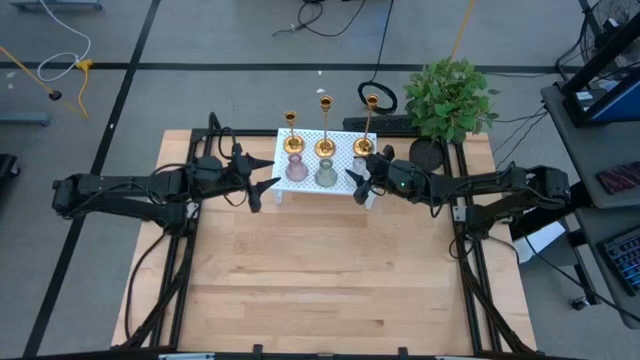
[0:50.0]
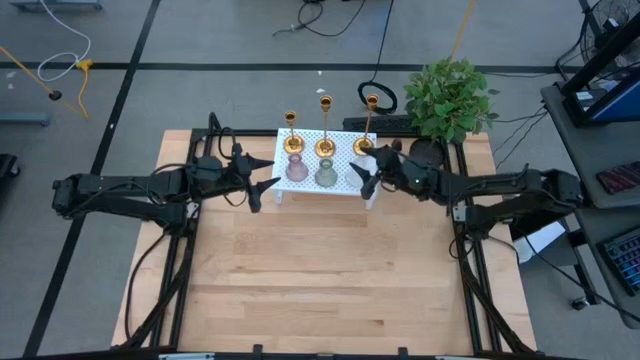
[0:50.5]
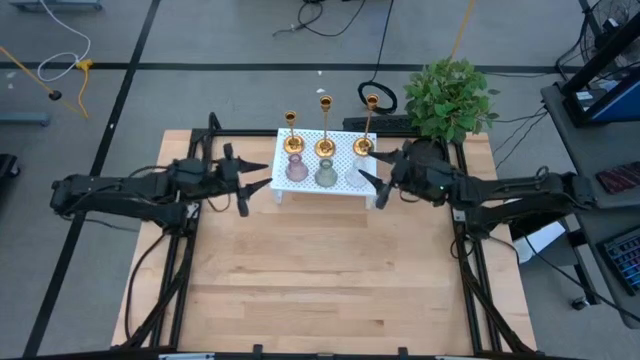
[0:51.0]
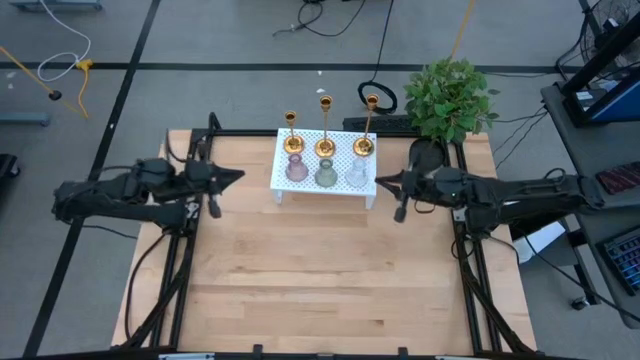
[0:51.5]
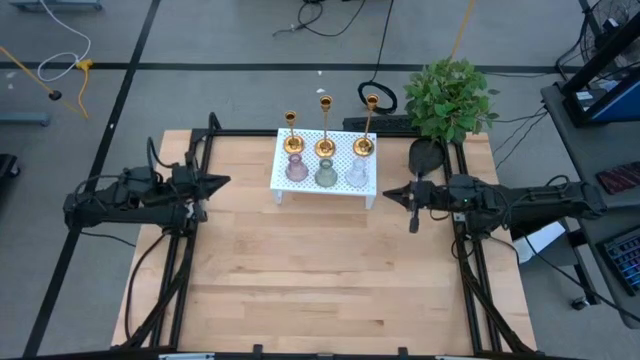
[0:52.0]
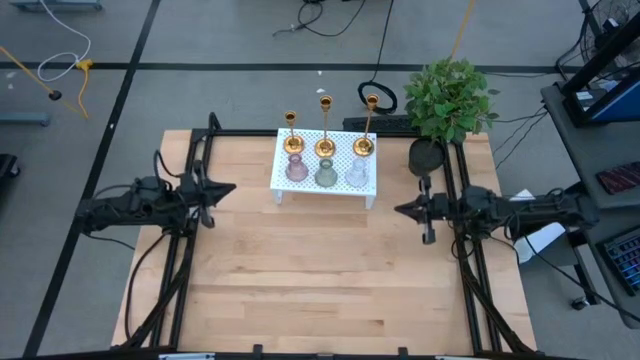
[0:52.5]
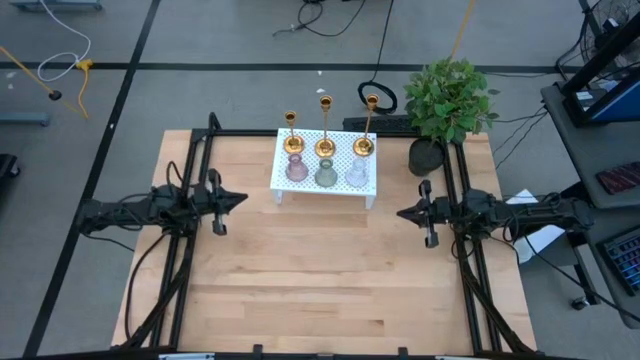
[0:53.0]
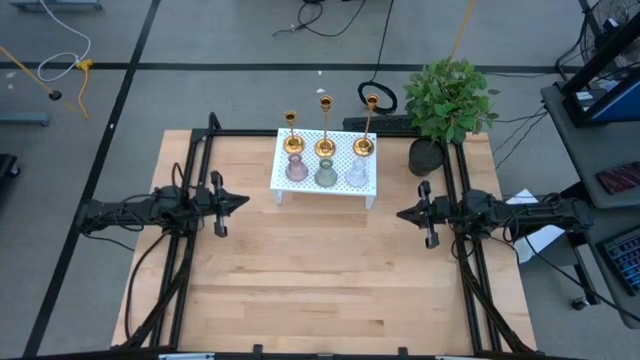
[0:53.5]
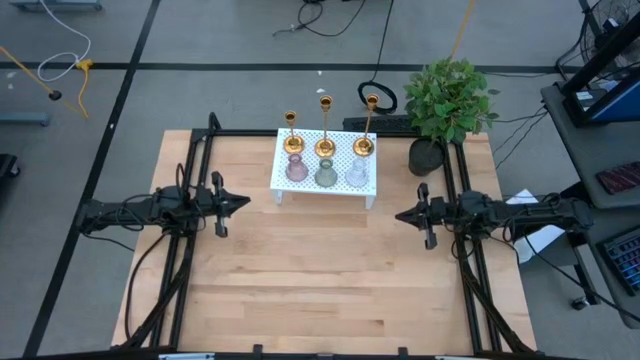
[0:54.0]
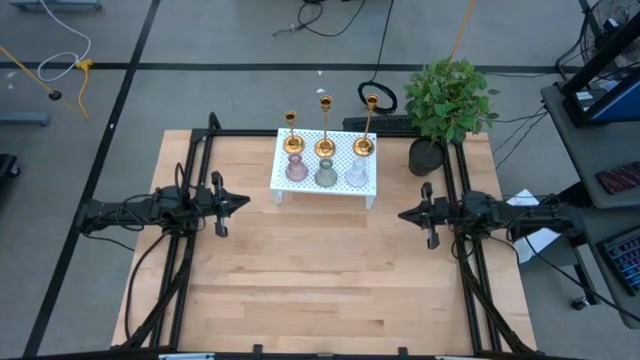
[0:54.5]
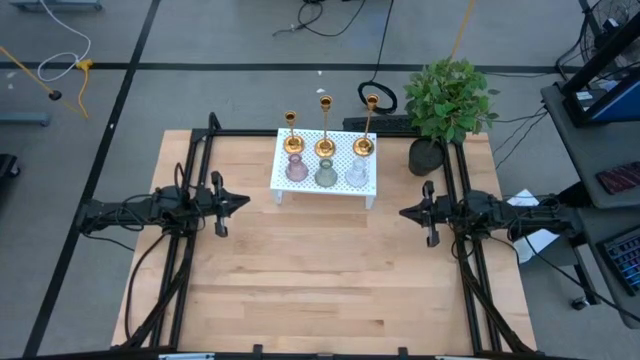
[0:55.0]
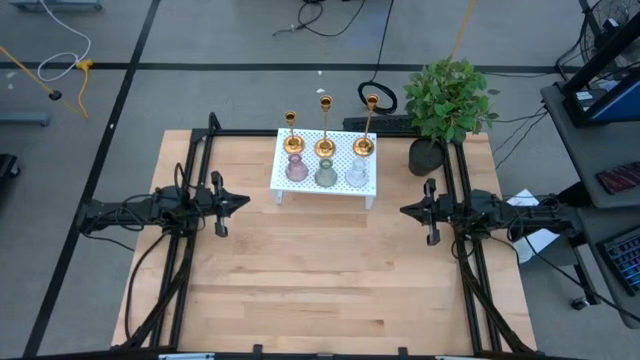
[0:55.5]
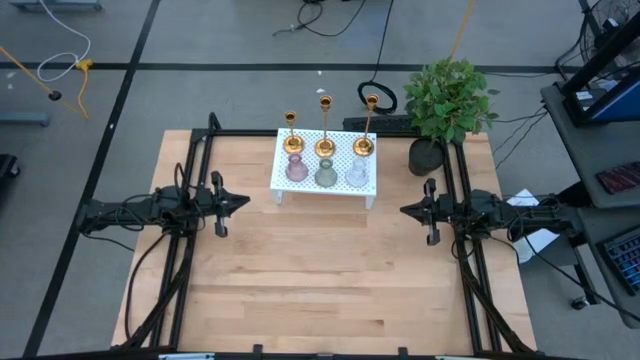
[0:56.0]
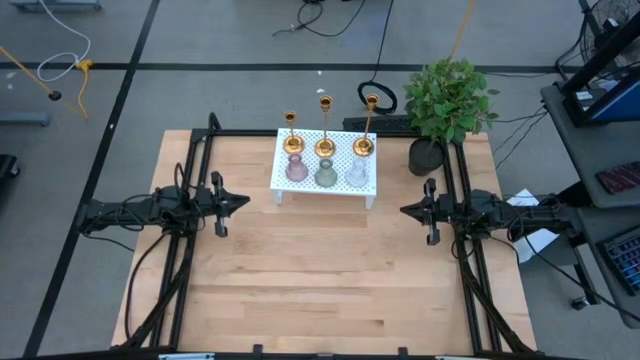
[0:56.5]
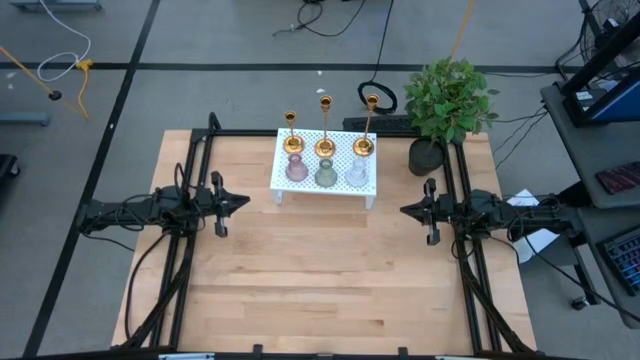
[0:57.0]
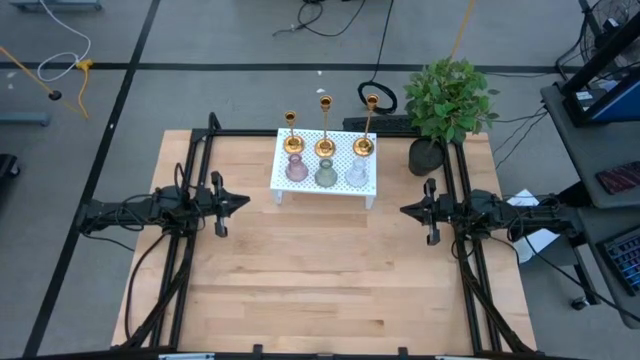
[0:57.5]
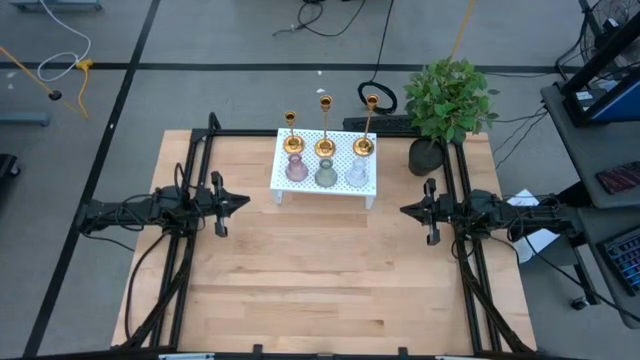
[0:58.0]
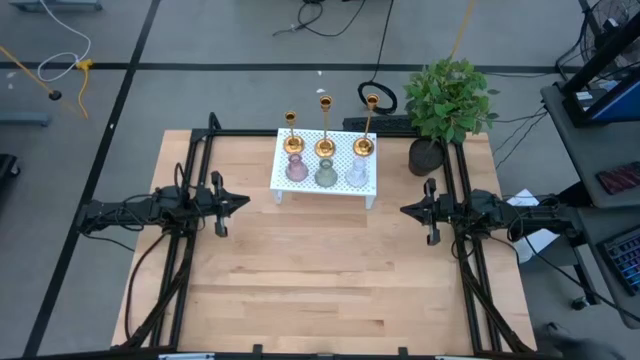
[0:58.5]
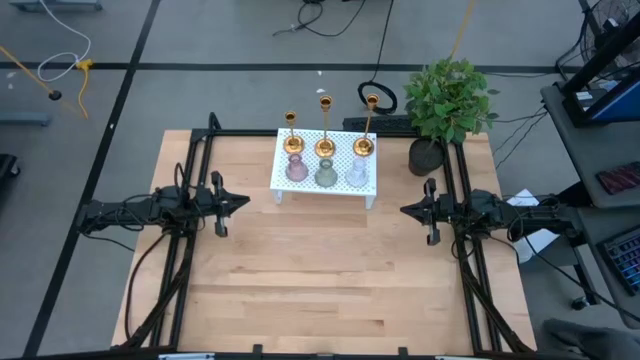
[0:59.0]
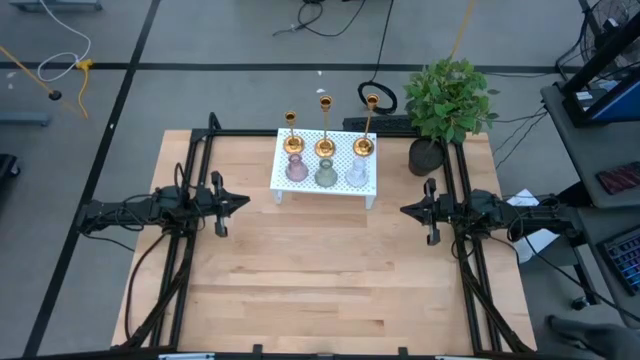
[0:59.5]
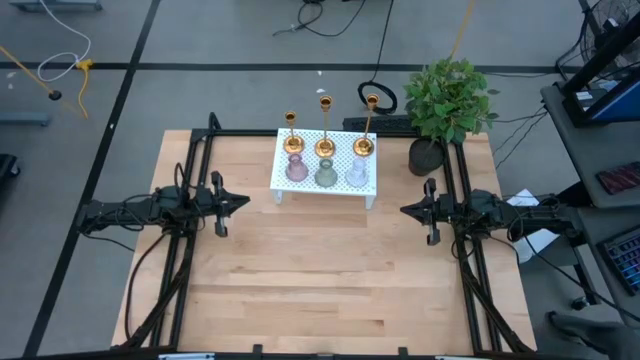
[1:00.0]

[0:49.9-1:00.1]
Task: Pick & Place candle stick holders
Return to Home Position

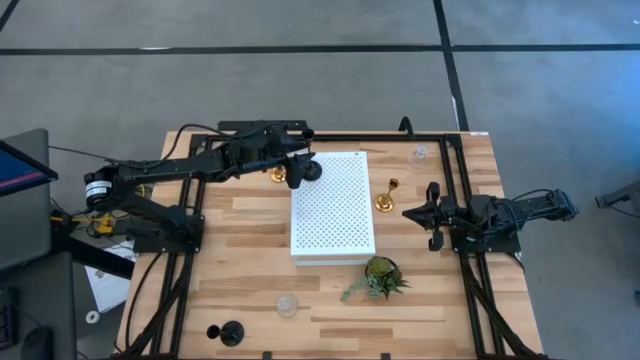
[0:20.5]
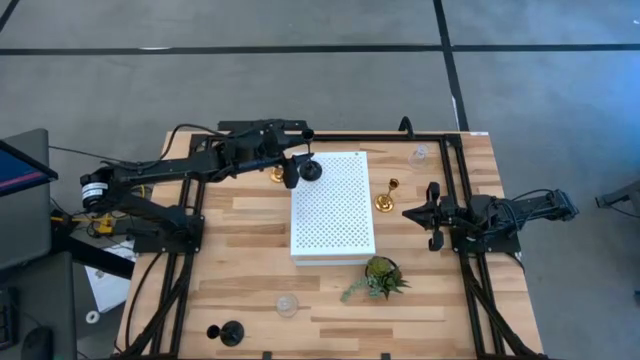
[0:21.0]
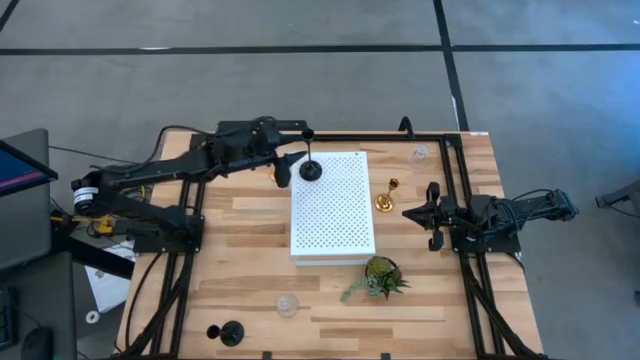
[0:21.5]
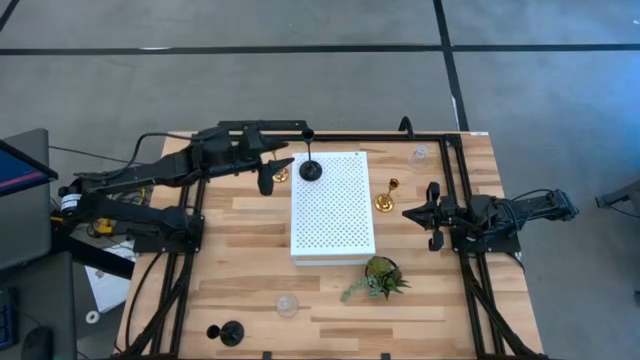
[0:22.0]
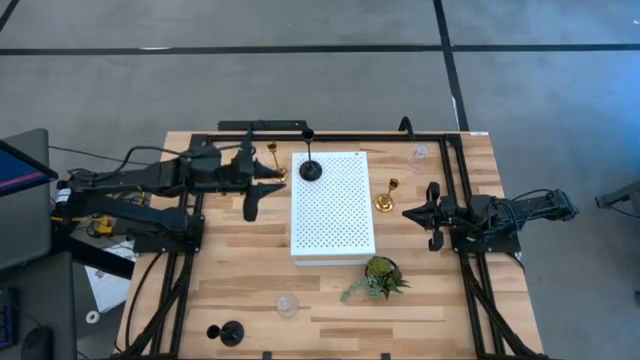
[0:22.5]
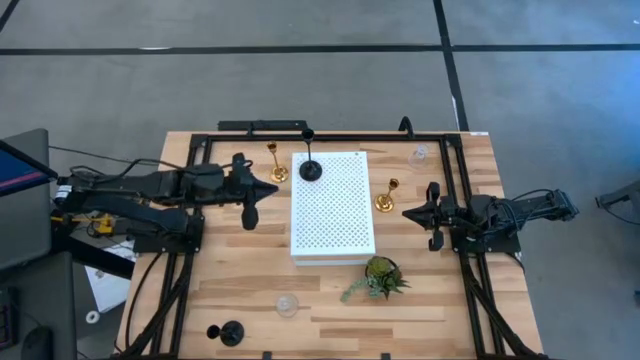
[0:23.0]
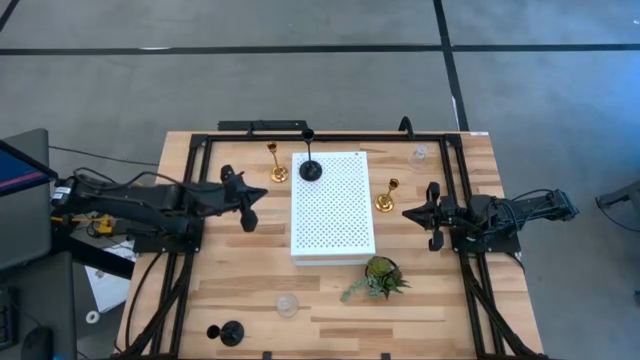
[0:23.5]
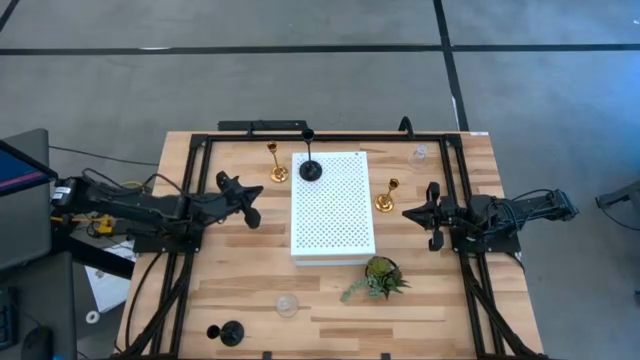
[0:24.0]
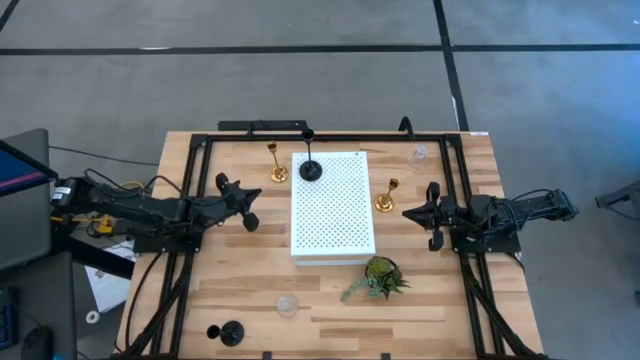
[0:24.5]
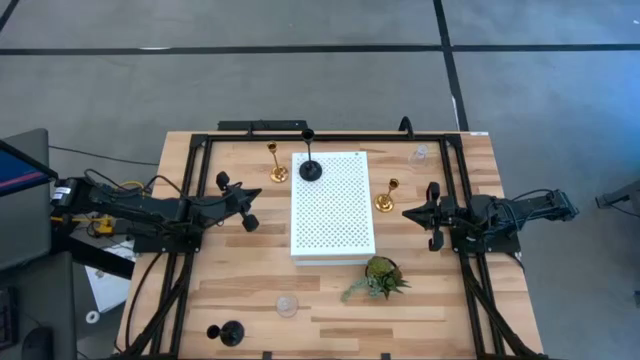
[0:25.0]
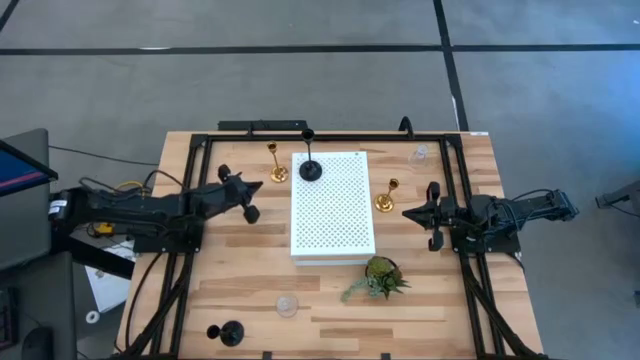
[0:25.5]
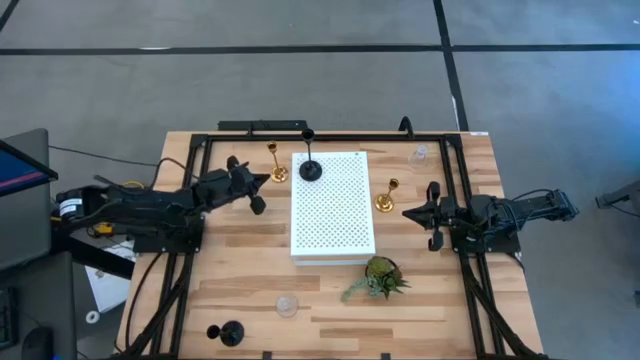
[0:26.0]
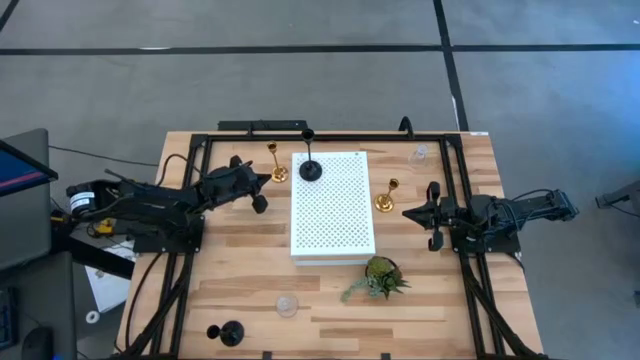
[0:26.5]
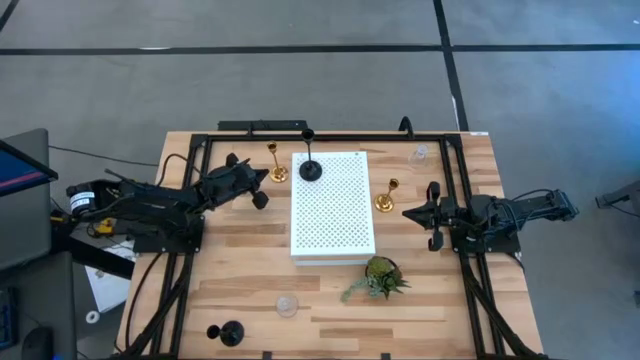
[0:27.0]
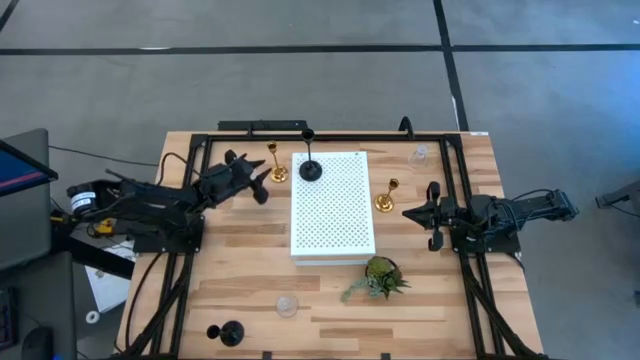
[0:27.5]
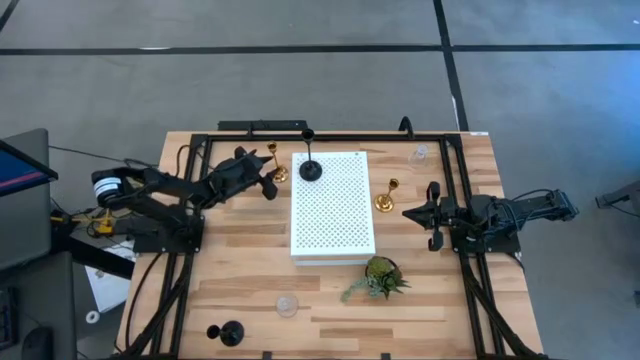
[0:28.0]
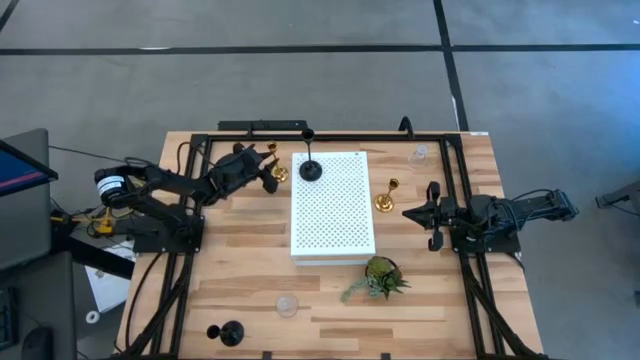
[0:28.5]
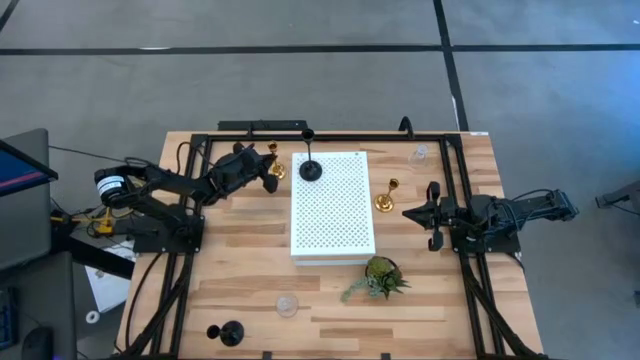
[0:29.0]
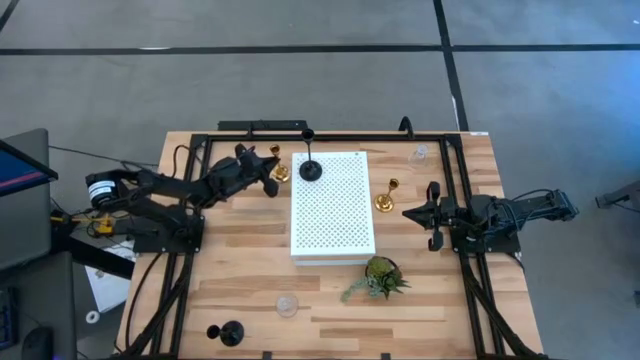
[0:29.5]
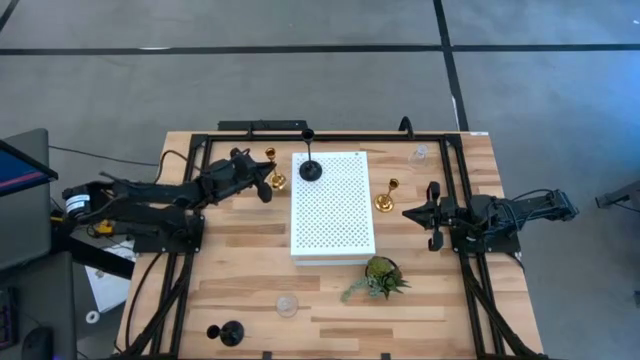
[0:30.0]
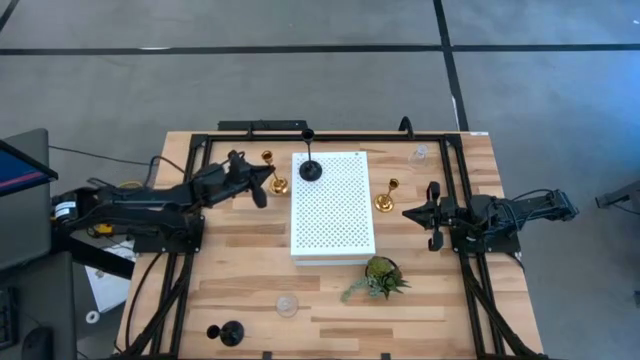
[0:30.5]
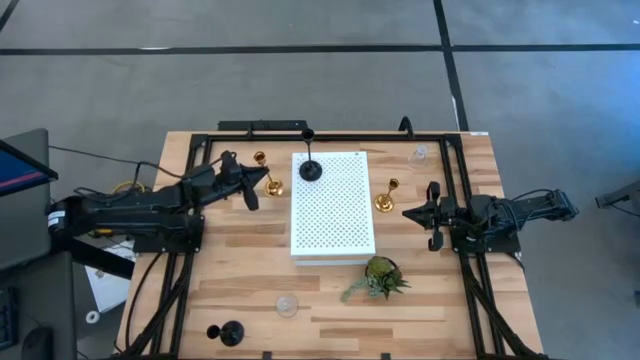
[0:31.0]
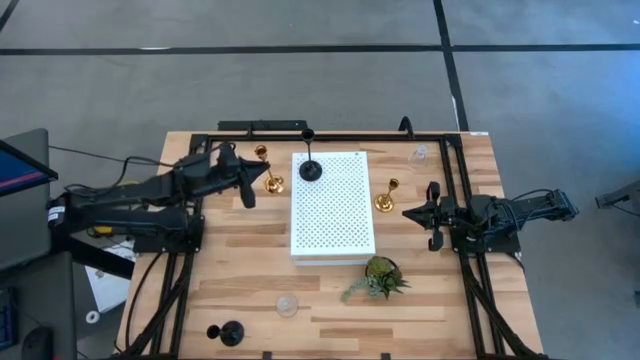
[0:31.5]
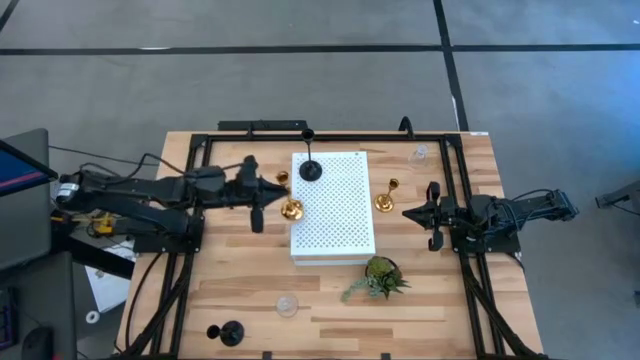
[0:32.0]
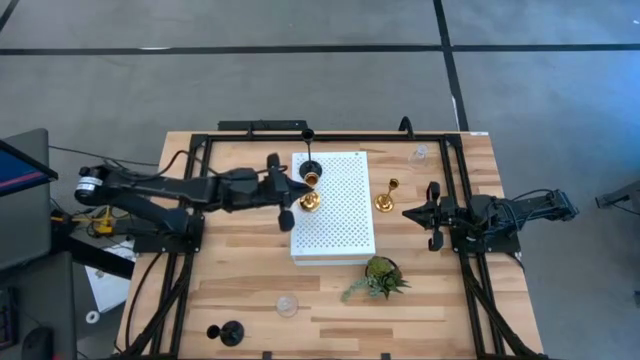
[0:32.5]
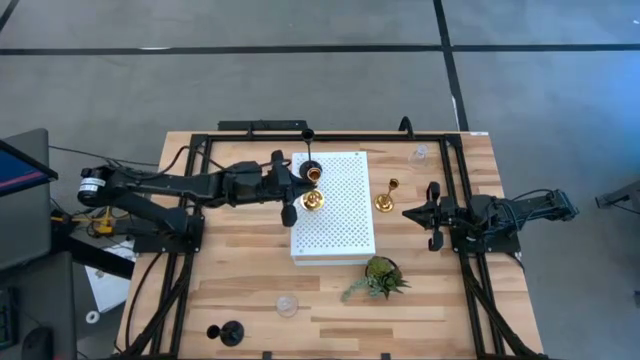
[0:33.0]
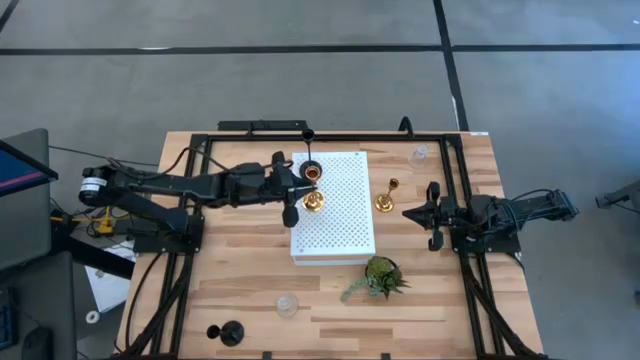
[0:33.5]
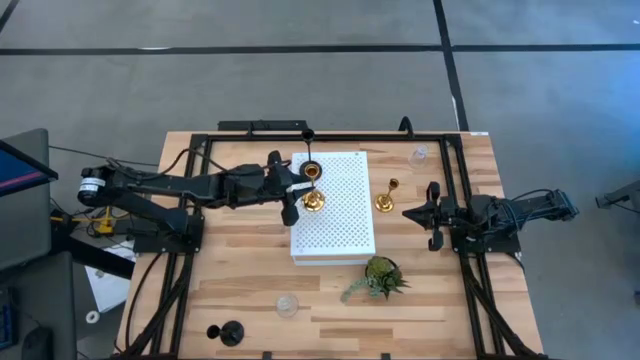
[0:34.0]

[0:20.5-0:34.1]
Task: Pick & Place candle stick holders
Put the left gold candle holder on the shelf
